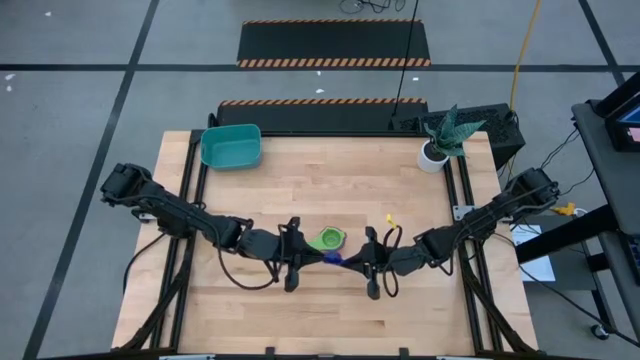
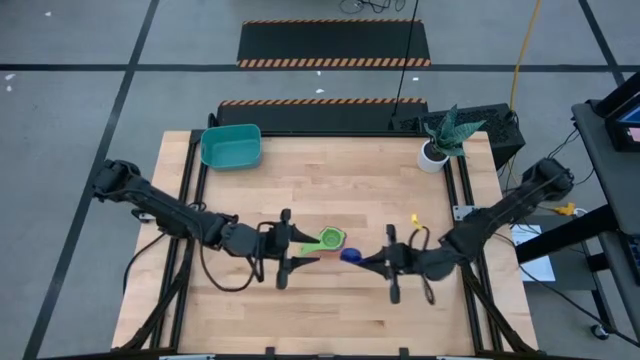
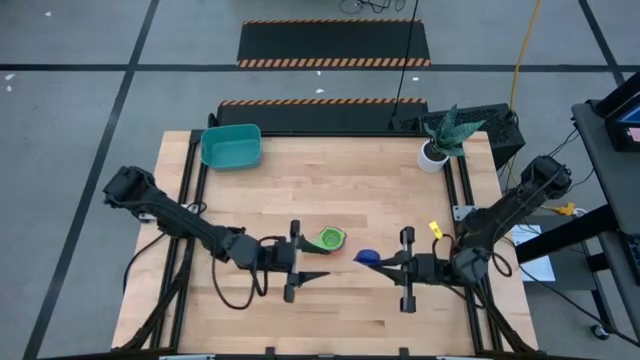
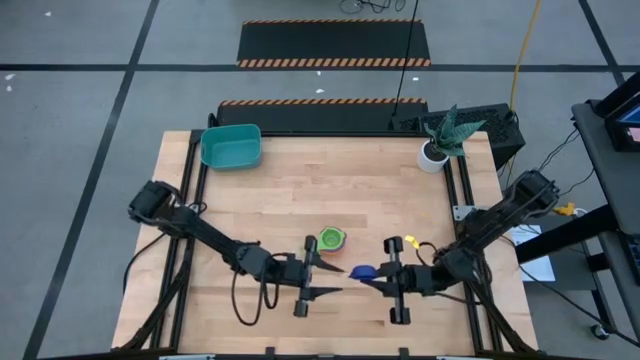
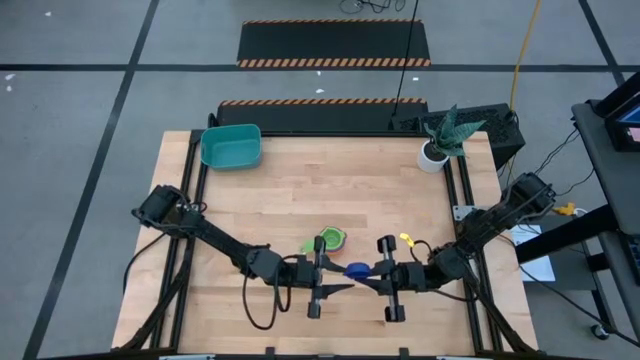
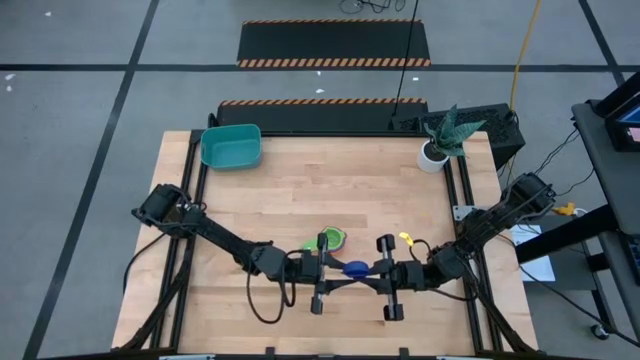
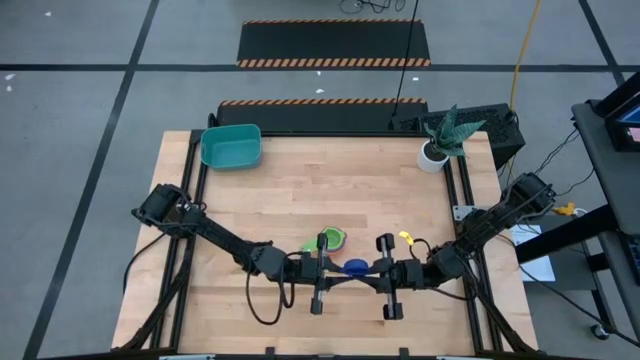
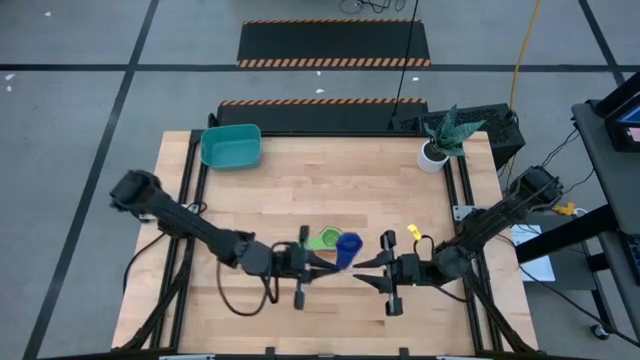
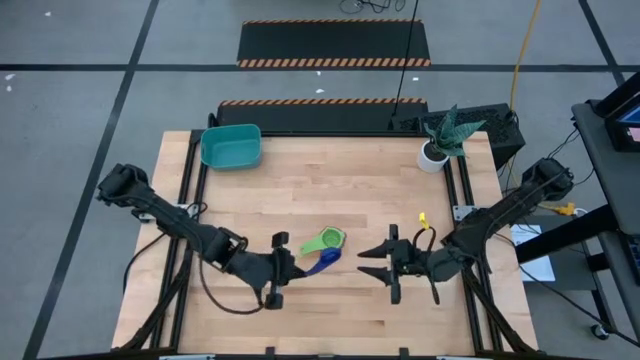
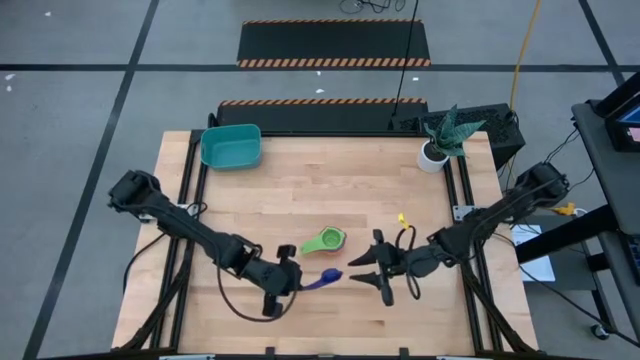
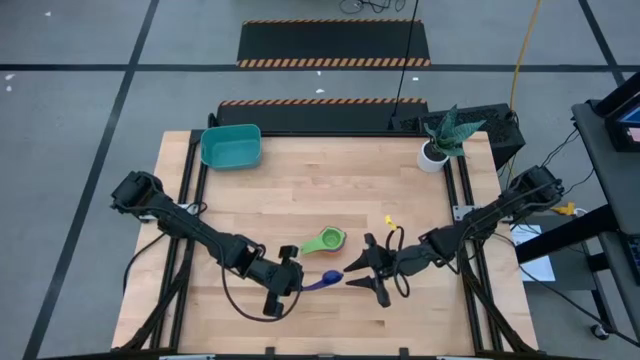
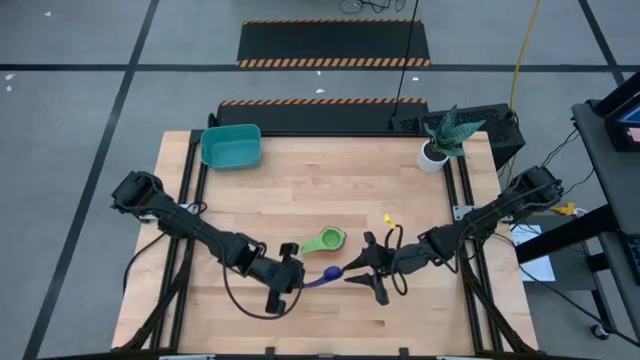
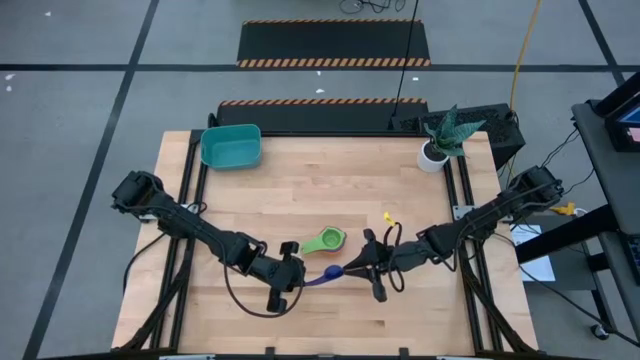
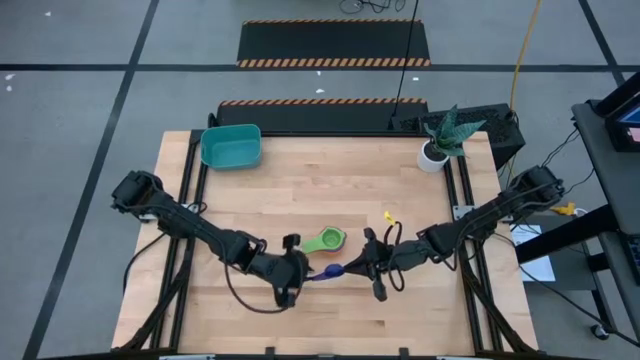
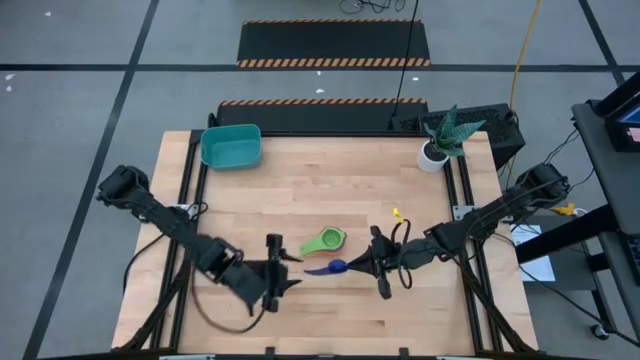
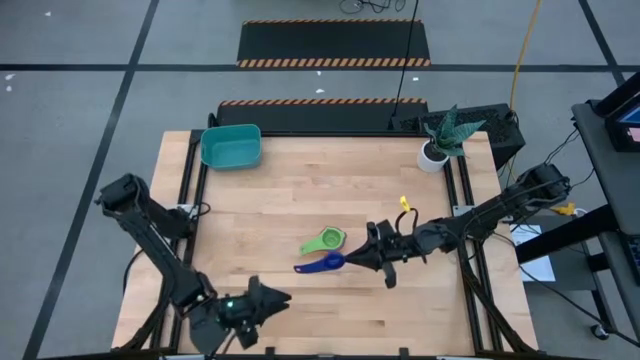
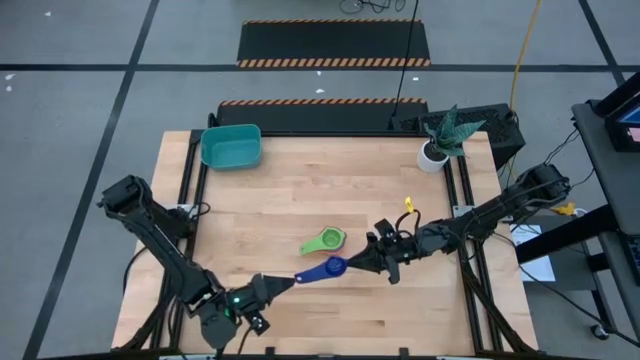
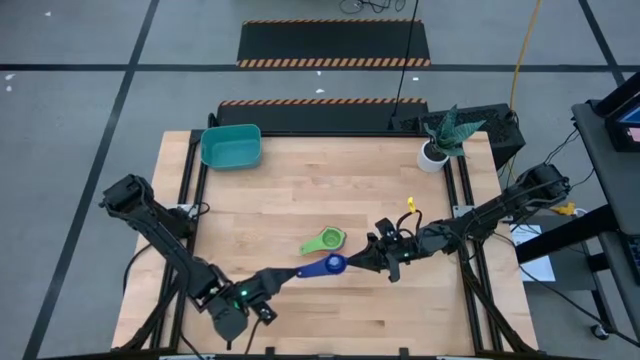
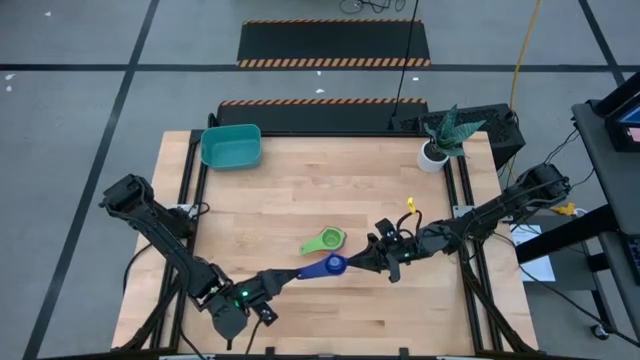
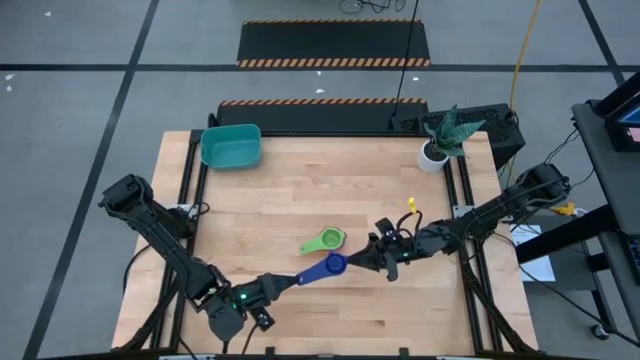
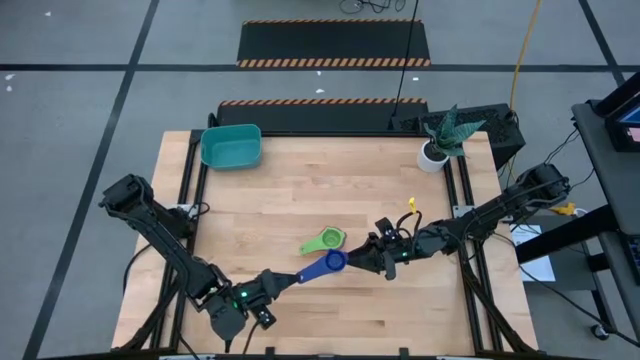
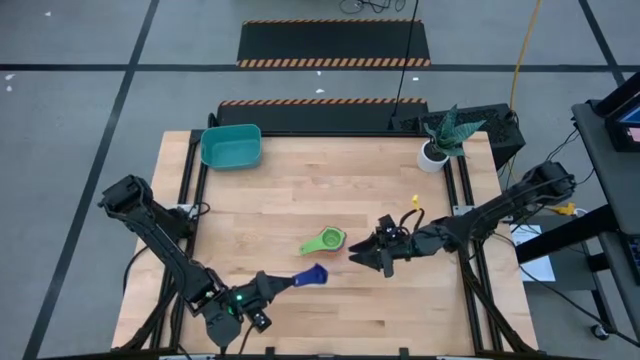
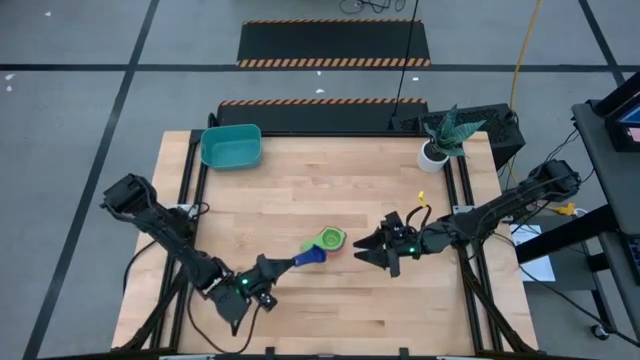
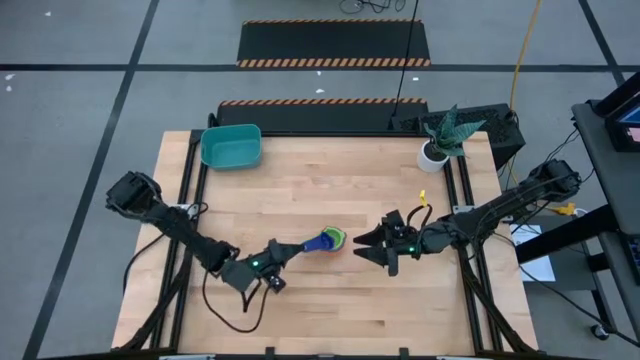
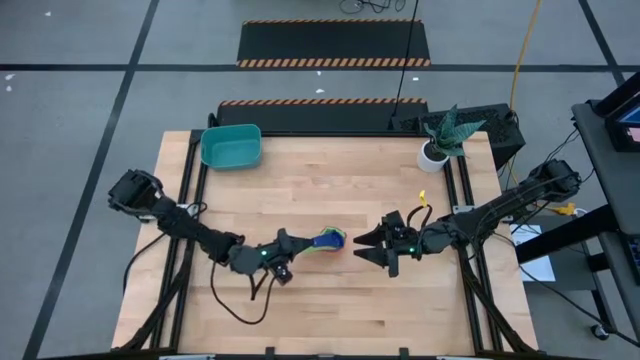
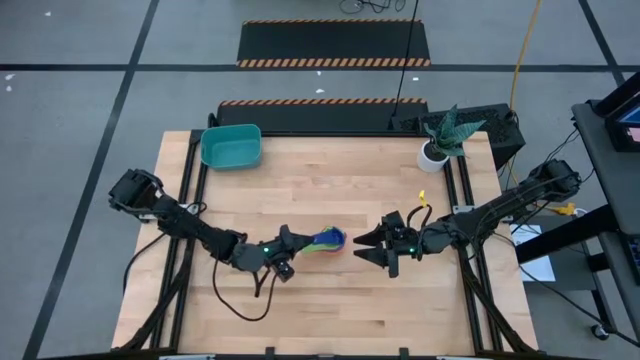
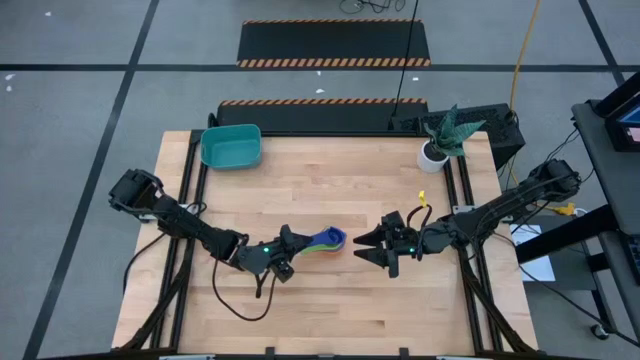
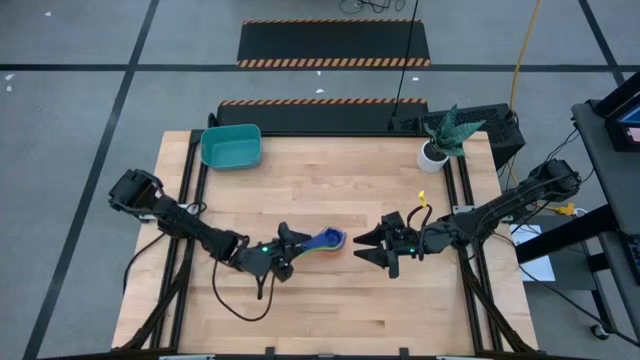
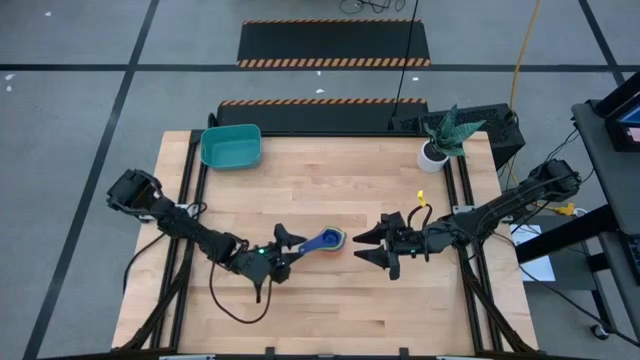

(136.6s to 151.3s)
Task: Nest measuring cups in basket
Stack the dark blue measuring cup on top of the green measuring cup

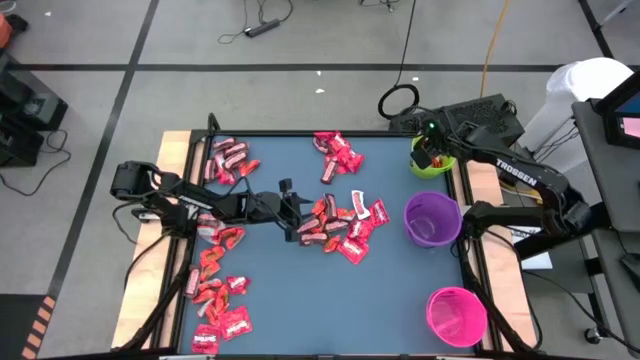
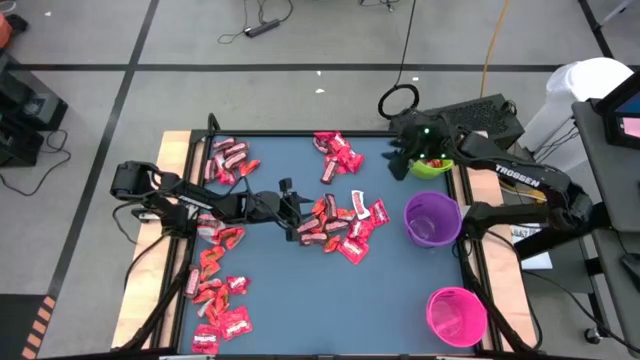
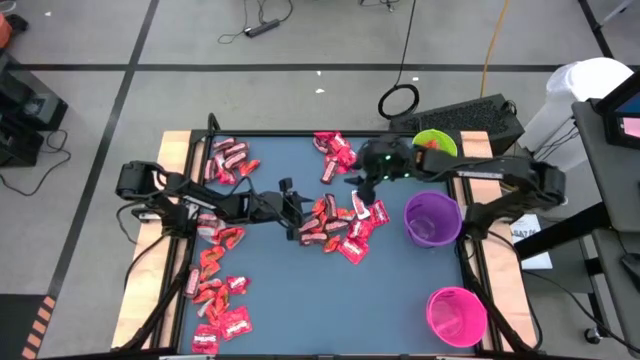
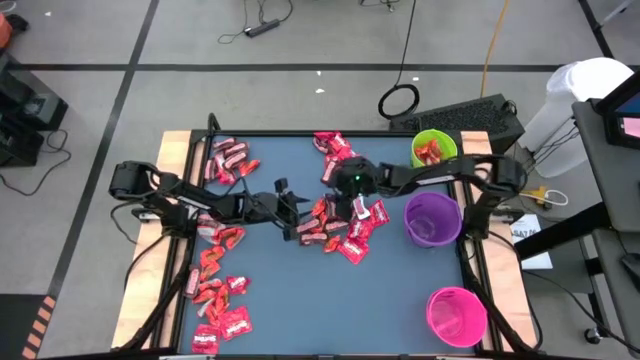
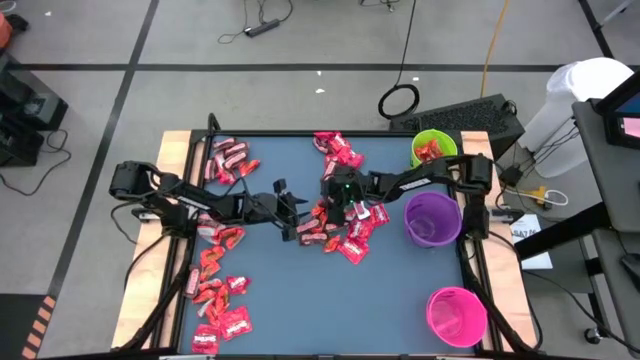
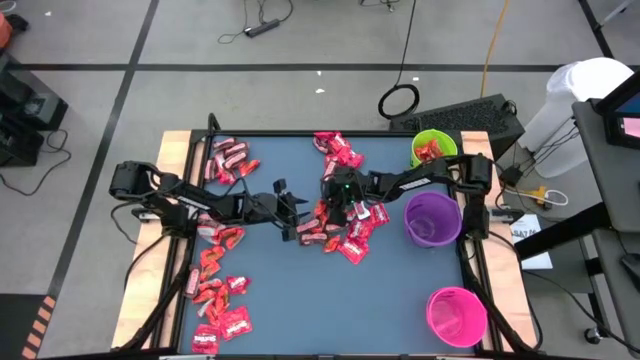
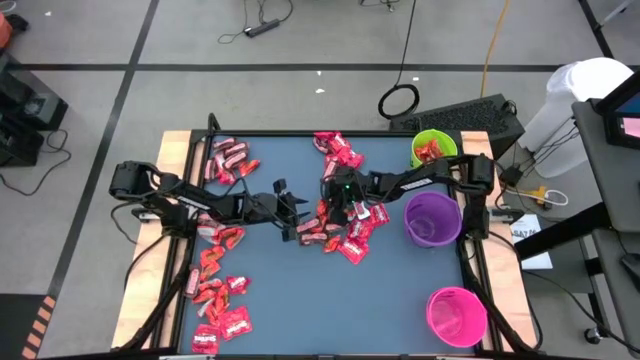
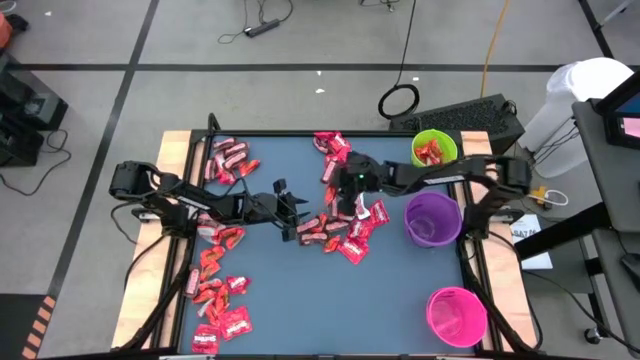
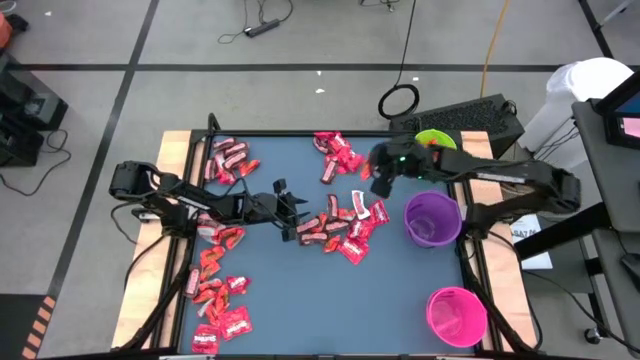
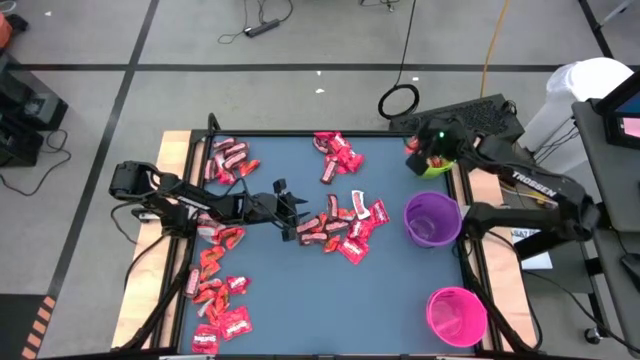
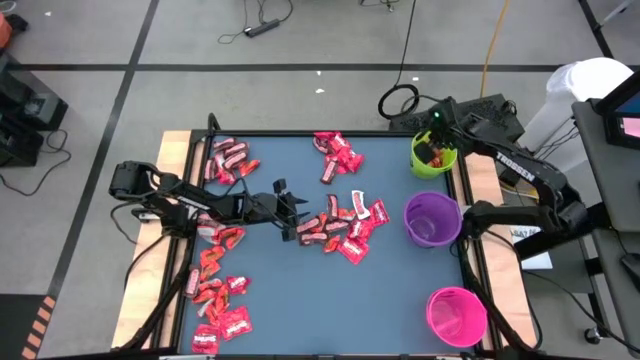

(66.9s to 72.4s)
Task: Organize candy in baskets
Put the orange chocolate bar into the green bucket
